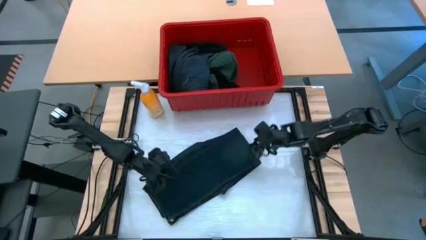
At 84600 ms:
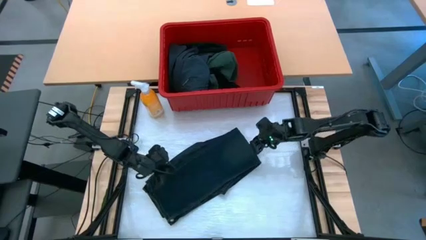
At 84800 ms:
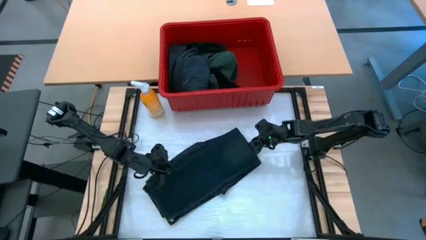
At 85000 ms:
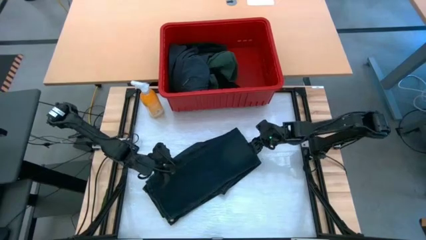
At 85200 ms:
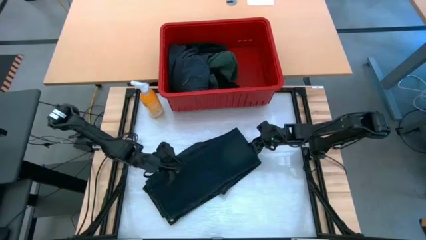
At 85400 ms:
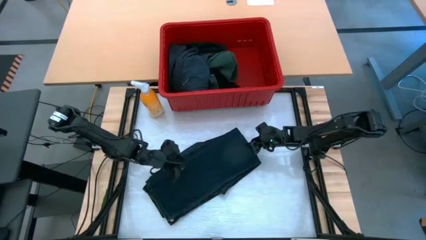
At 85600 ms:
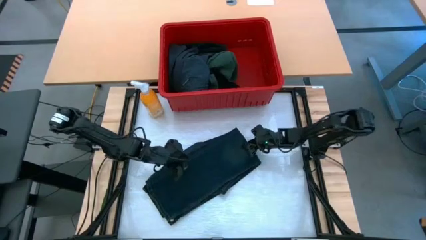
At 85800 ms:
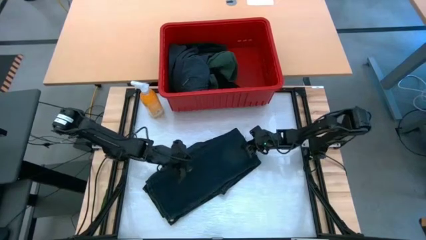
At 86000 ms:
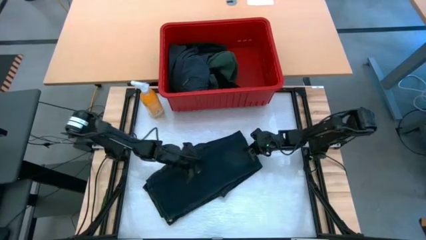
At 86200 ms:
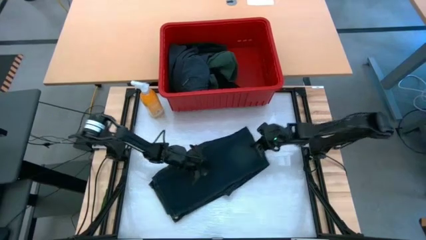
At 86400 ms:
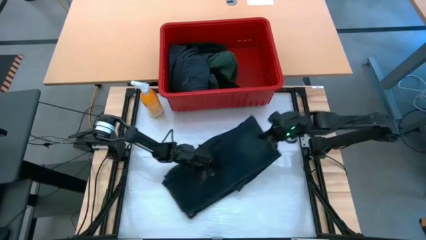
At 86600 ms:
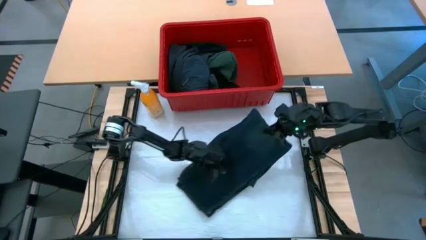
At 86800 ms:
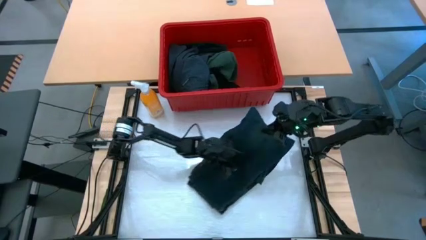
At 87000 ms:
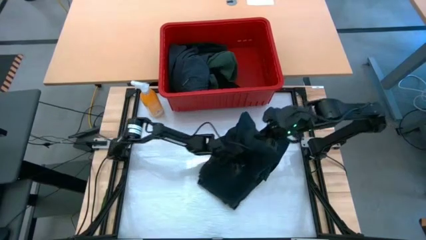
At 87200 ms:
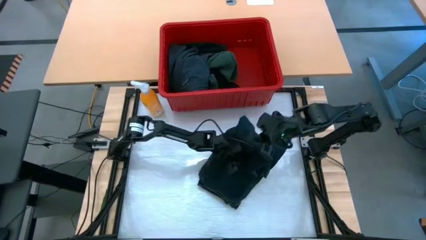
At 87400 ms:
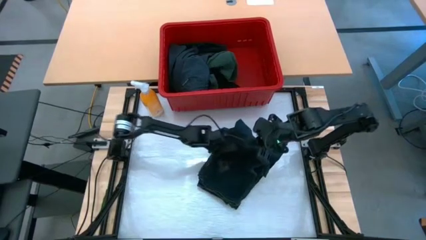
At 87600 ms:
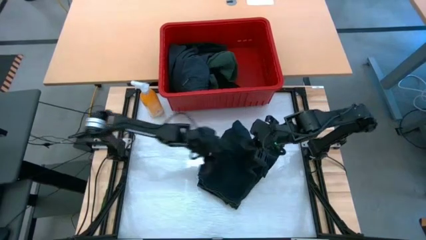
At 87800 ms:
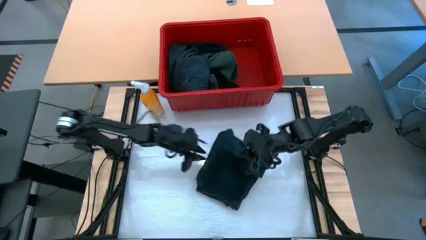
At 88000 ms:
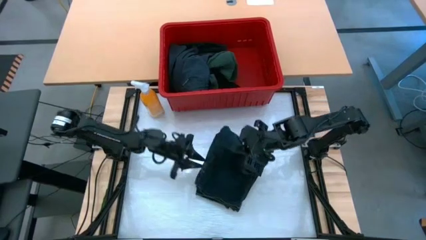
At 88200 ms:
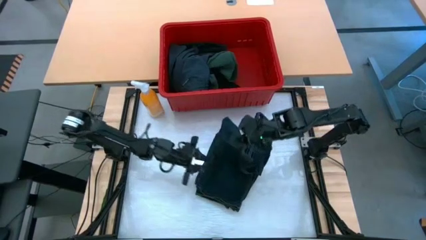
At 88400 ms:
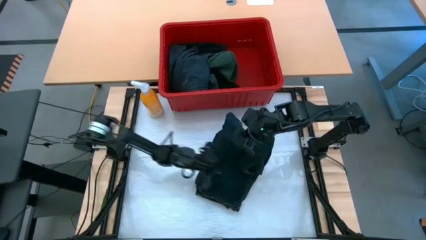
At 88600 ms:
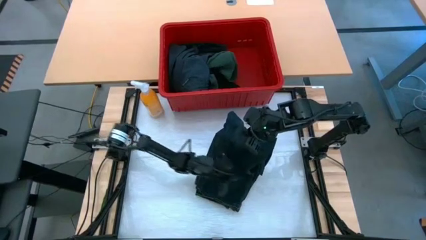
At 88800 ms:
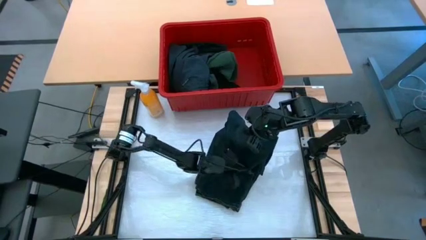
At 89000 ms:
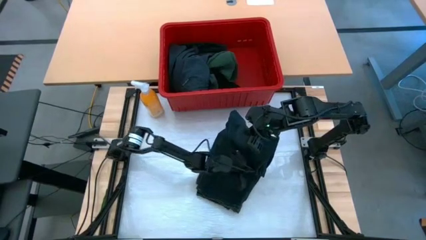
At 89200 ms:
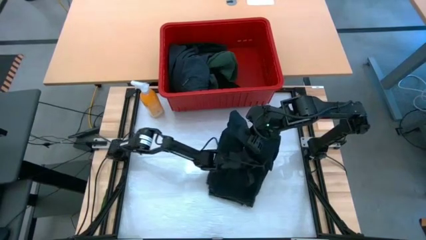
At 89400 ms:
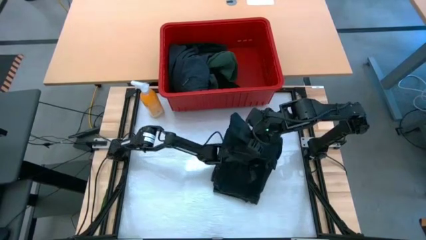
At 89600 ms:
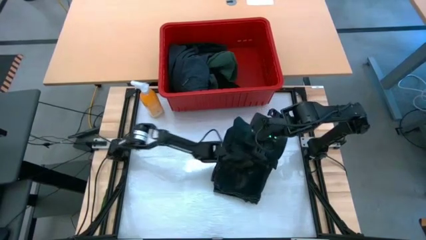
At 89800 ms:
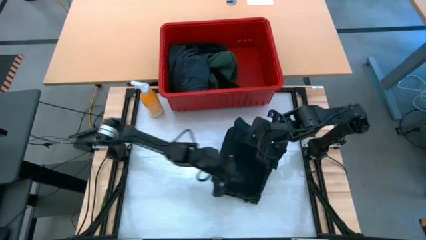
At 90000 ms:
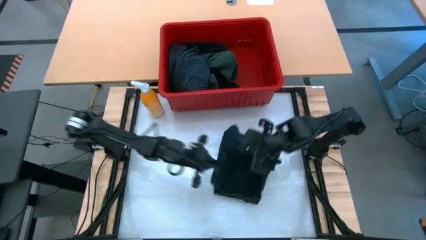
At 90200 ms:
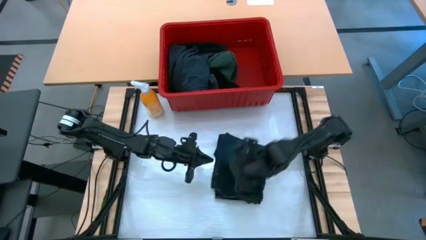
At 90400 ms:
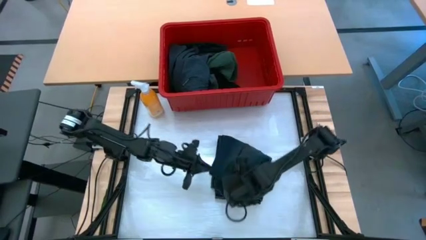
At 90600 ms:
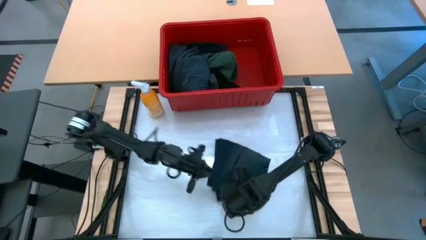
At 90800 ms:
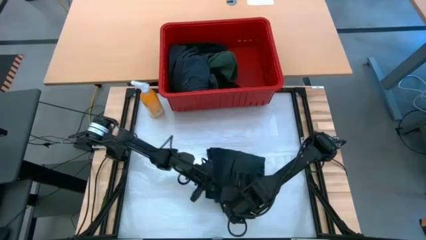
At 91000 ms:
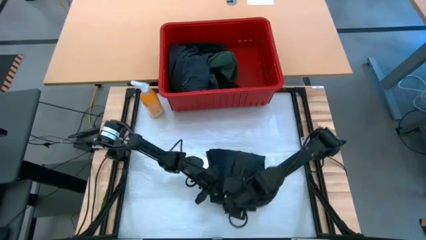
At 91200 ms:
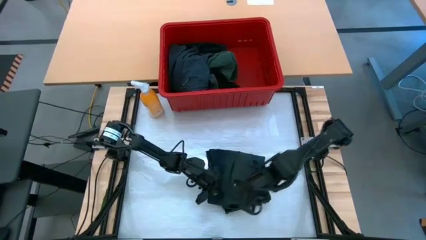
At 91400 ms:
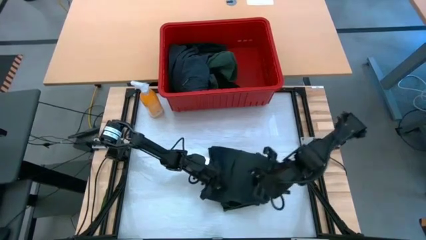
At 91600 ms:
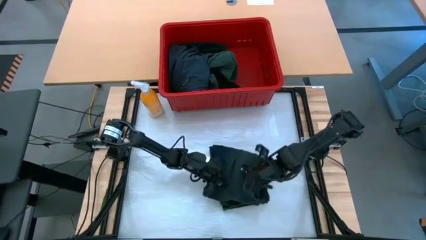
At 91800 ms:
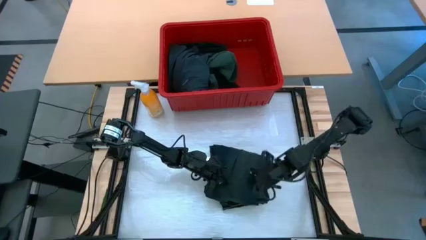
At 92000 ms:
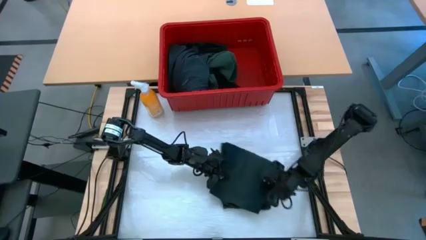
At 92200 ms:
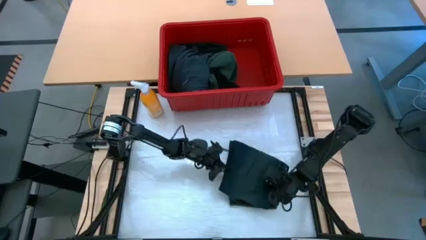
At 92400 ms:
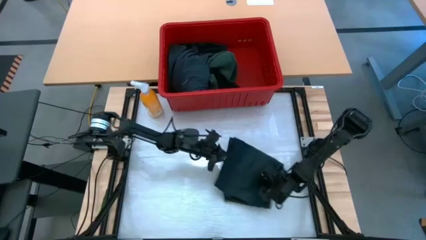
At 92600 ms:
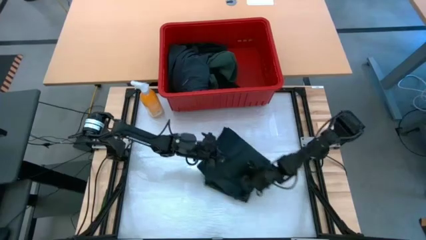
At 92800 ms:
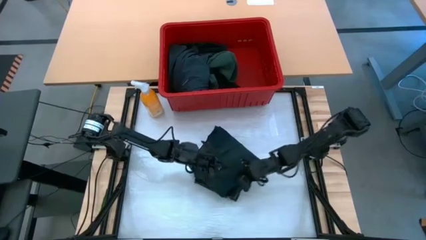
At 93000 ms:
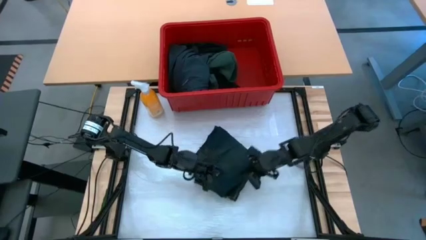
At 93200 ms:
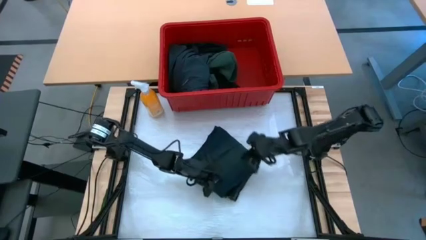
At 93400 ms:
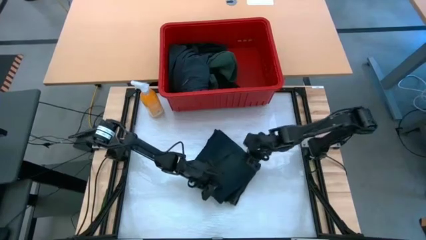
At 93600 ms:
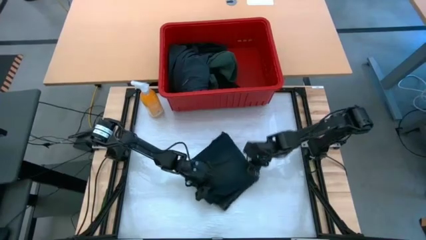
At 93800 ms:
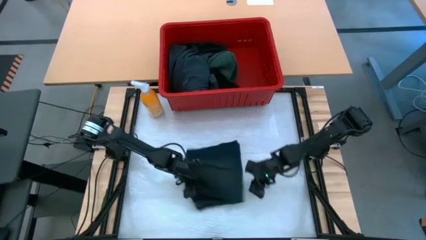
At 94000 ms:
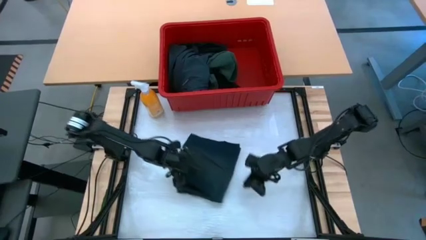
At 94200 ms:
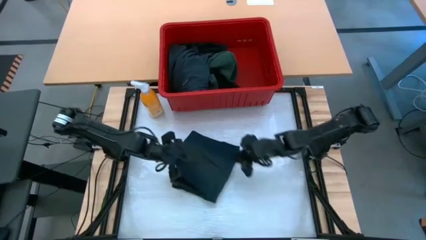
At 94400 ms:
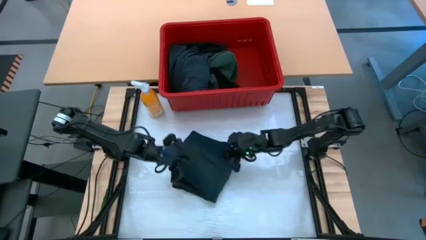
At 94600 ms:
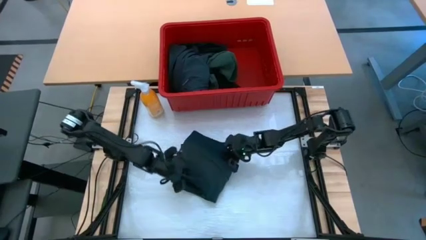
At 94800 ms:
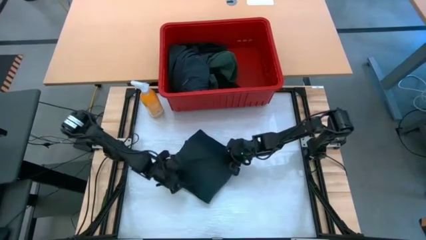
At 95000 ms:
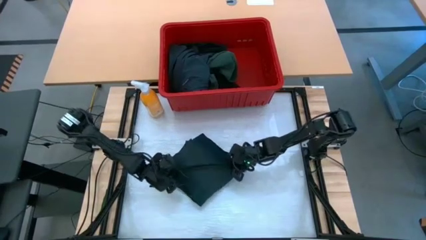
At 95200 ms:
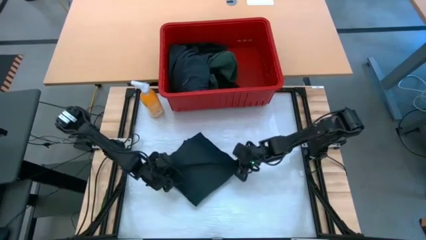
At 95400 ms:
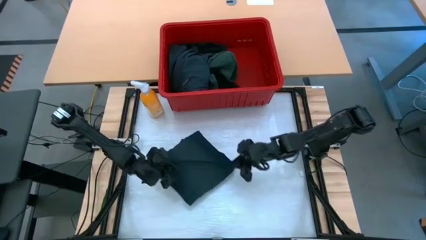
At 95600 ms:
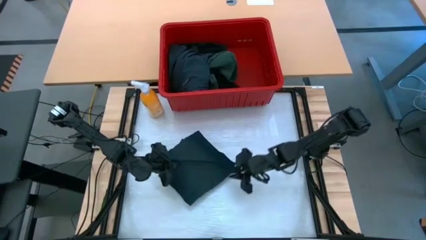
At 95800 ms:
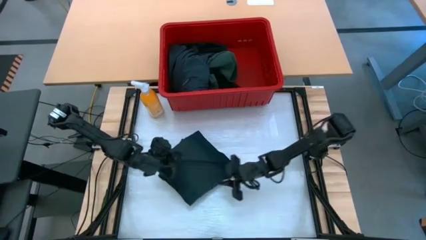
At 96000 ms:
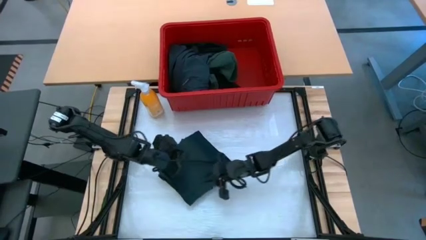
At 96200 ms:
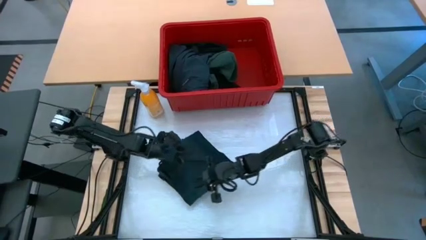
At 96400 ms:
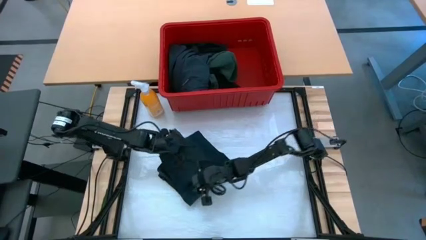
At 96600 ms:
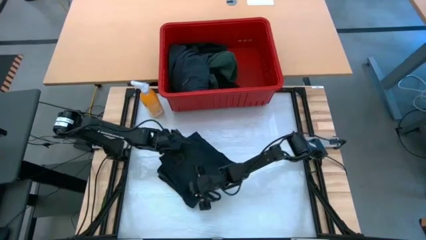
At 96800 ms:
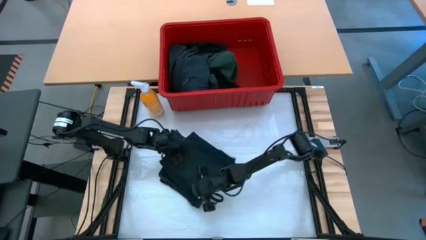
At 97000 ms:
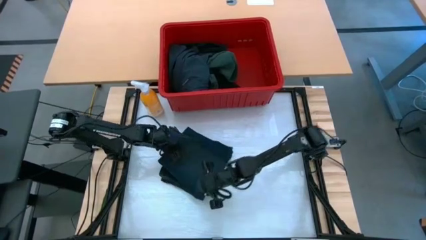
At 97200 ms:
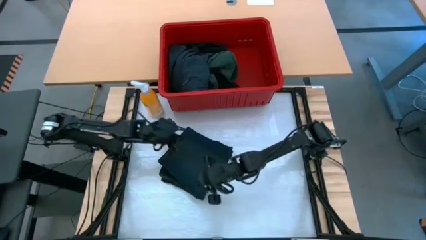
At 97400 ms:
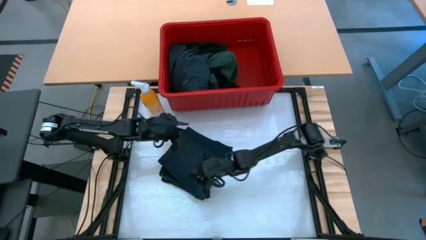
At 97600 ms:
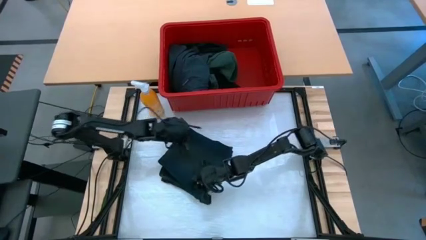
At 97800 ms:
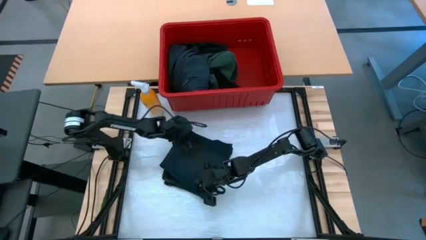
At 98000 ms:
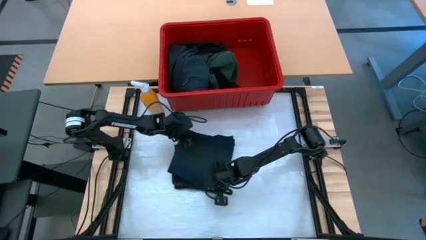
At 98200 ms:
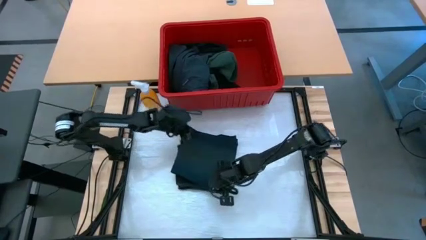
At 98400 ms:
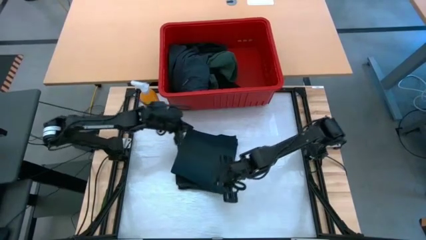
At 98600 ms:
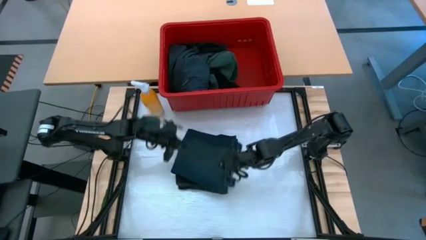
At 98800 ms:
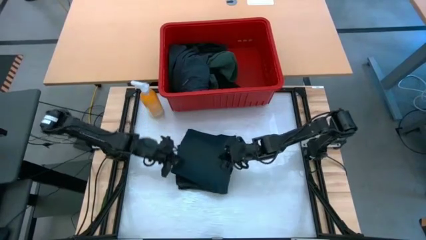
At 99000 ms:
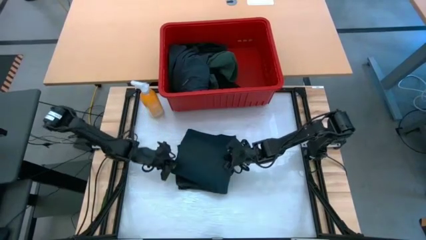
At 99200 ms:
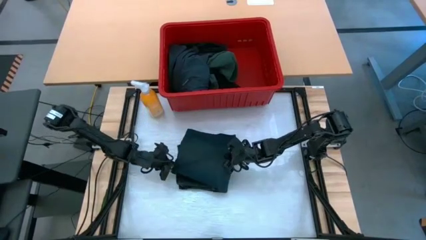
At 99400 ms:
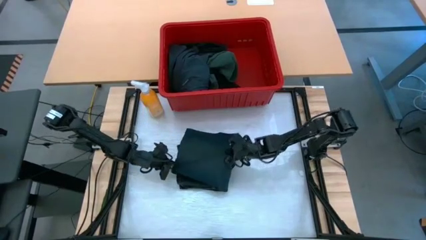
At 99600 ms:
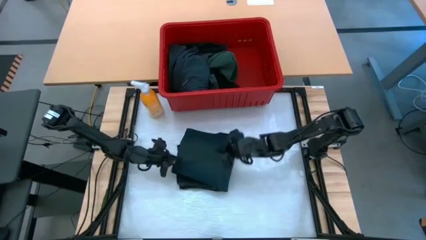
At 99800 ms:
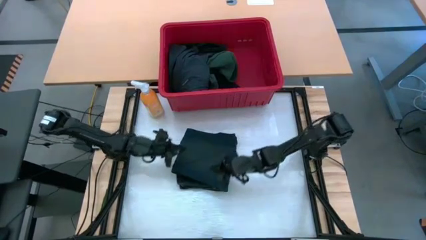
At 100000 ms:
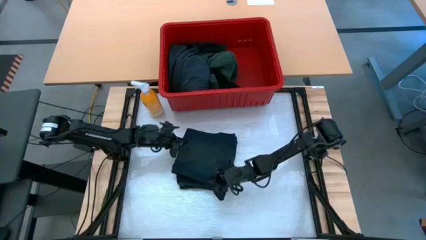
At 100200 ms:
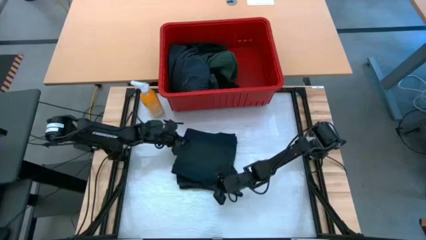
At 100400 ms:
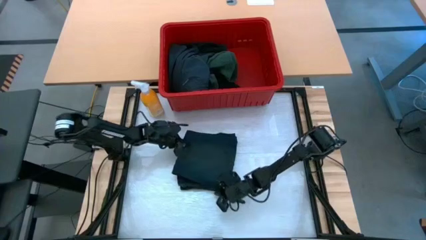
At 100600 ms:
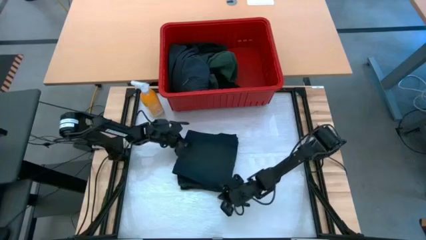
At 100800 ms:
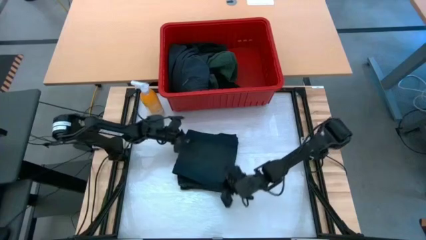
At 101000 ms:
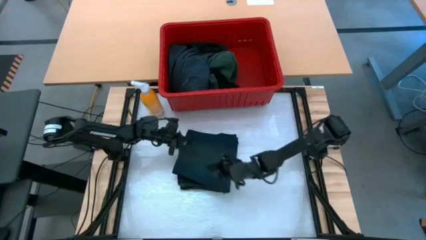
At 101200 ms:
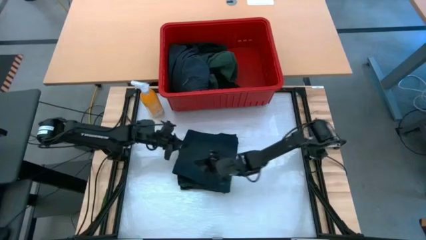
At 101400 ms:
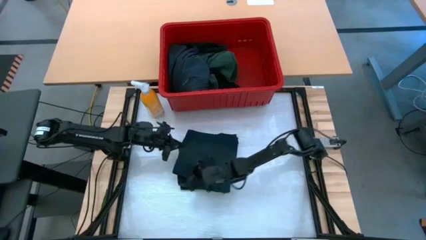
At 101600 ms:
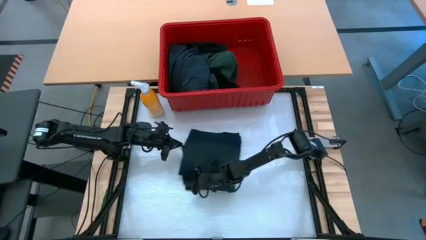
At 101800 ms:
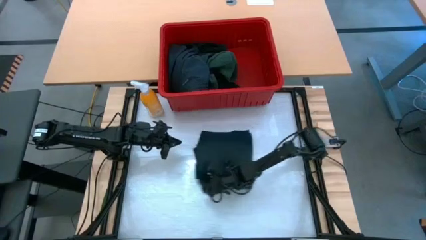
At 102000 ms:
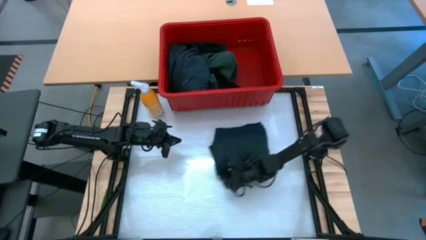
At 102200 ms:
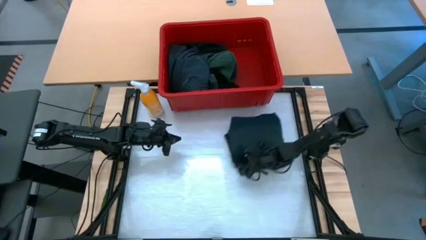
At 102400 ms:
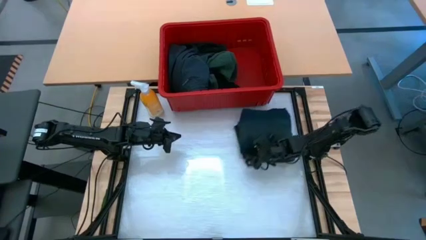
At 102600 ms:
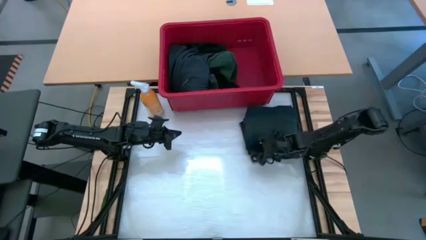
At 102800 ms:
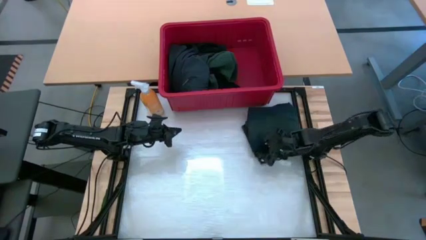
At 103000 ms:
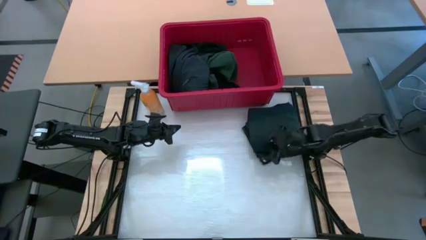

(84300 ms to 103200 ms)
Task: Fold Laundry from Bin
Fold the blue pants
